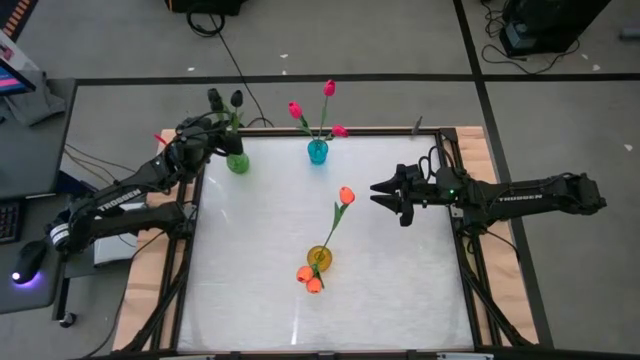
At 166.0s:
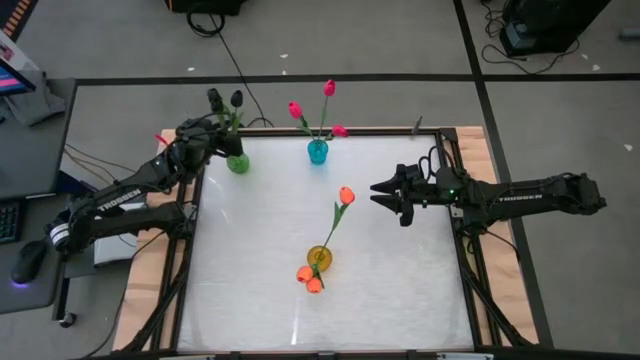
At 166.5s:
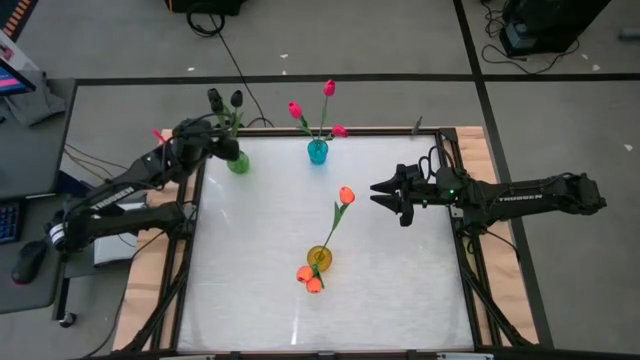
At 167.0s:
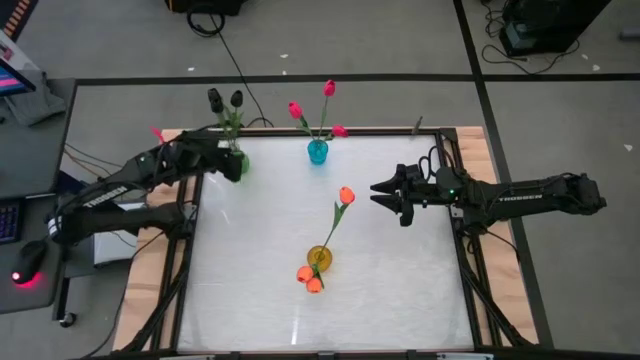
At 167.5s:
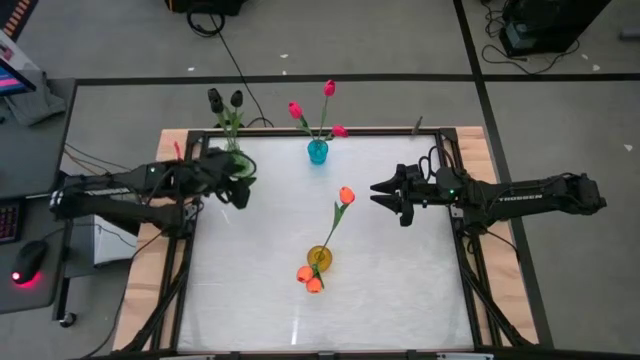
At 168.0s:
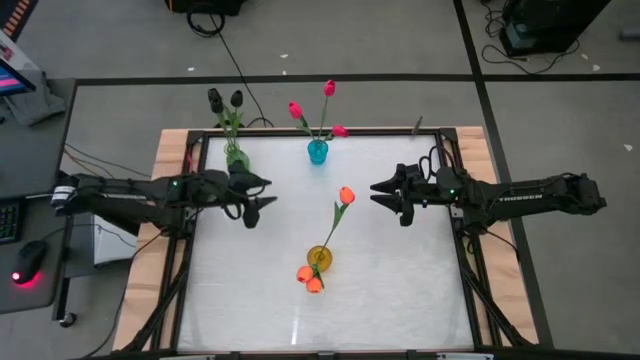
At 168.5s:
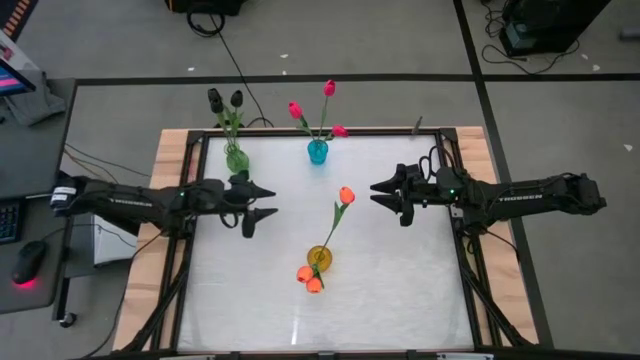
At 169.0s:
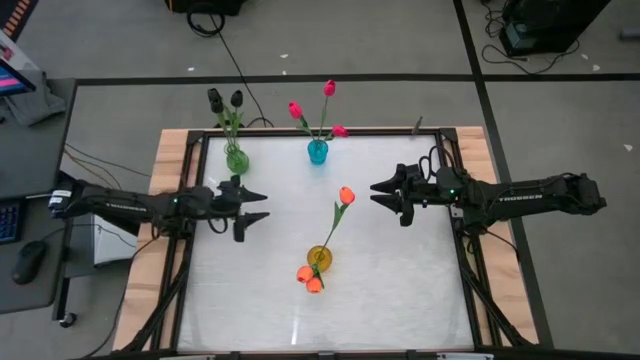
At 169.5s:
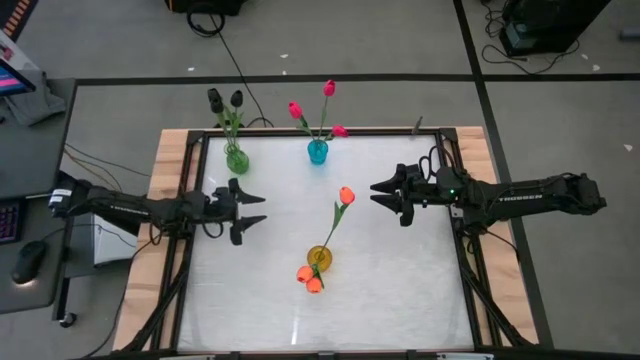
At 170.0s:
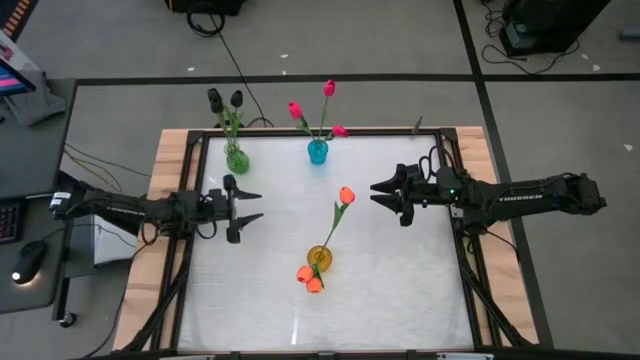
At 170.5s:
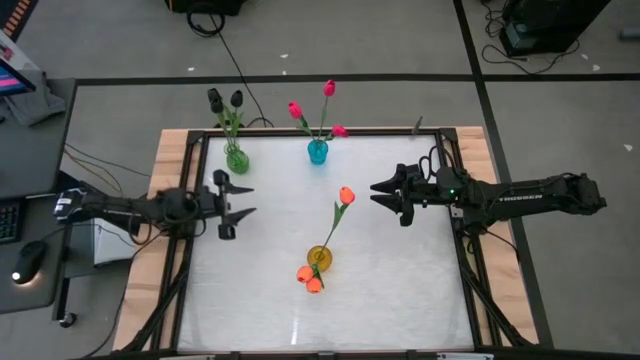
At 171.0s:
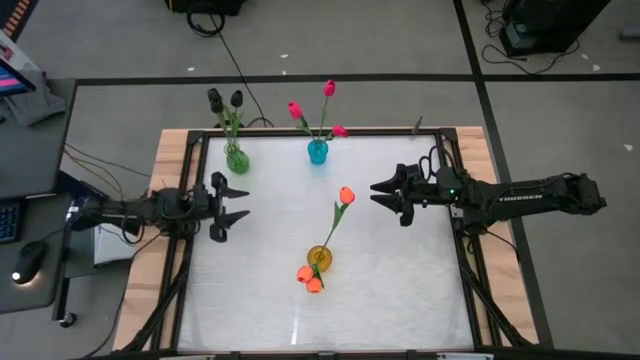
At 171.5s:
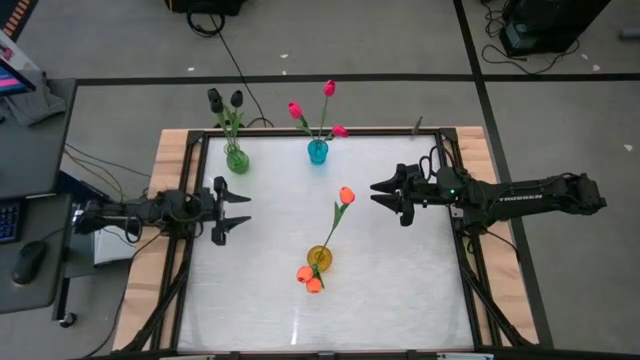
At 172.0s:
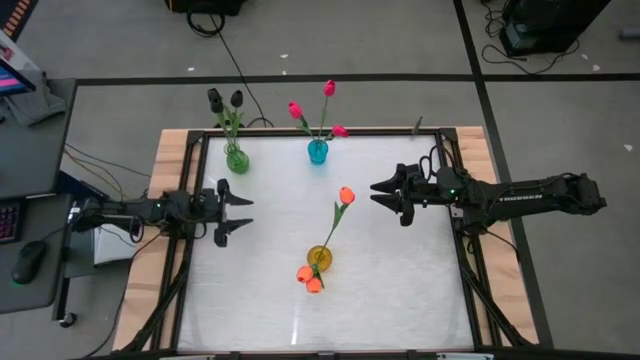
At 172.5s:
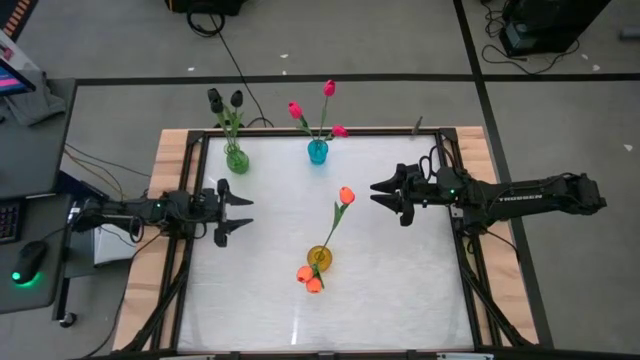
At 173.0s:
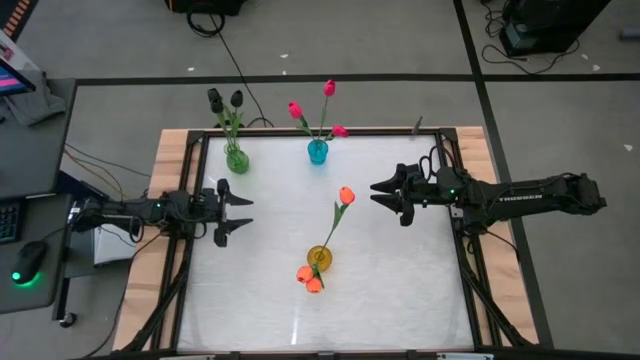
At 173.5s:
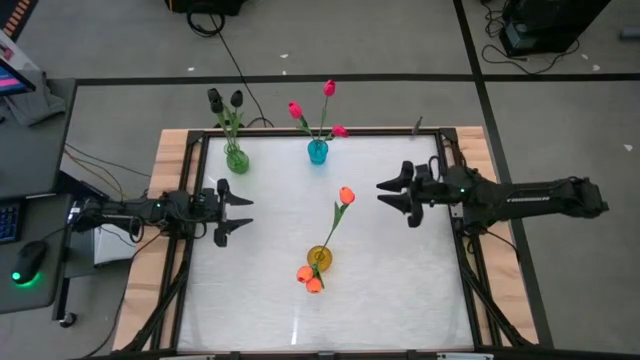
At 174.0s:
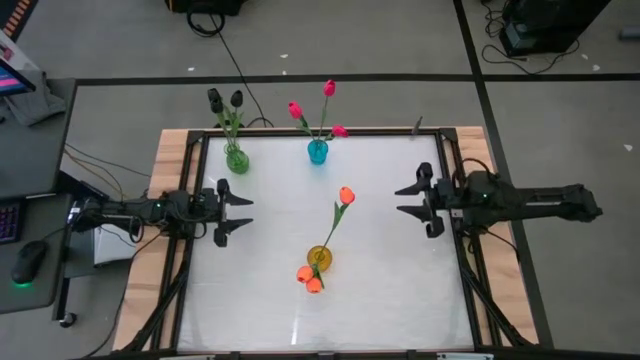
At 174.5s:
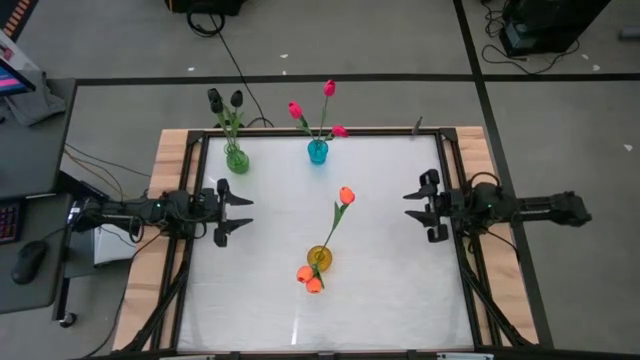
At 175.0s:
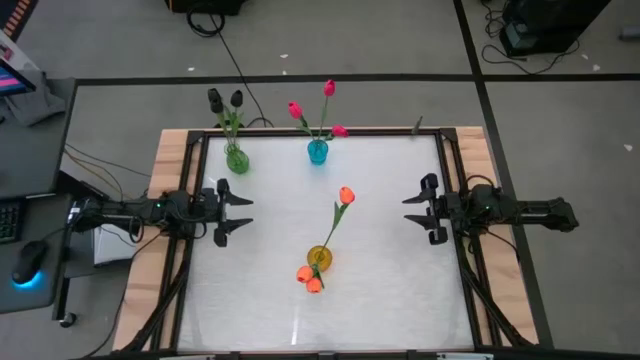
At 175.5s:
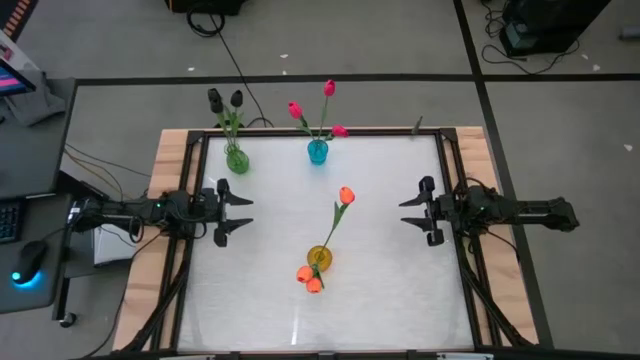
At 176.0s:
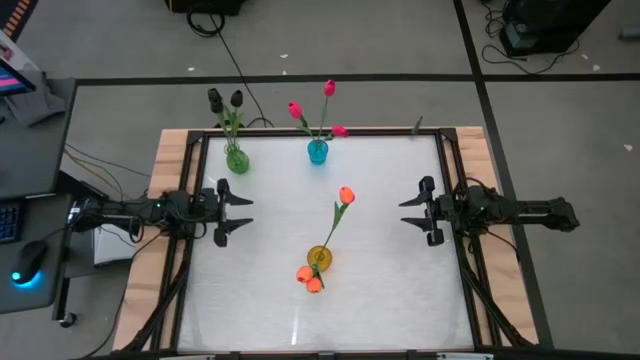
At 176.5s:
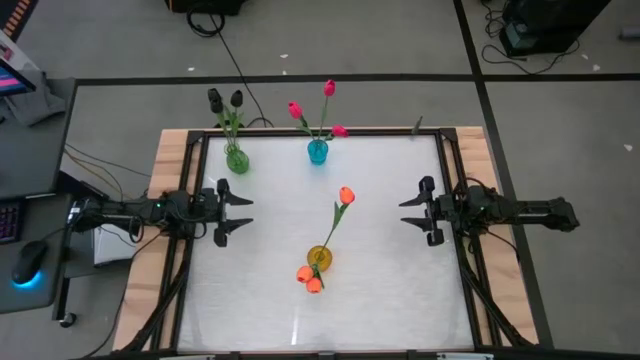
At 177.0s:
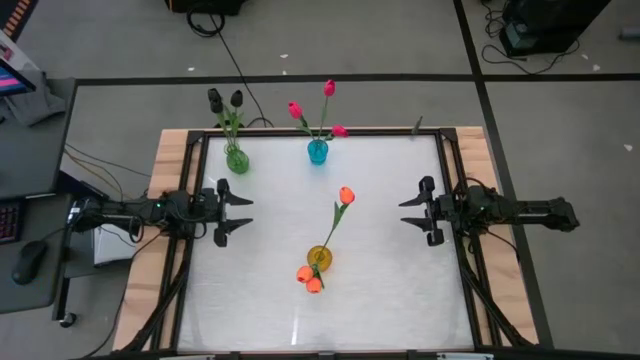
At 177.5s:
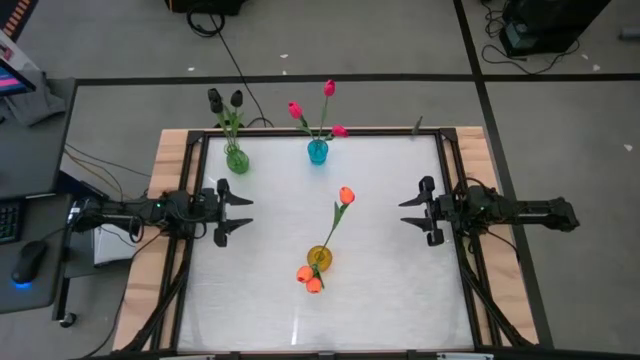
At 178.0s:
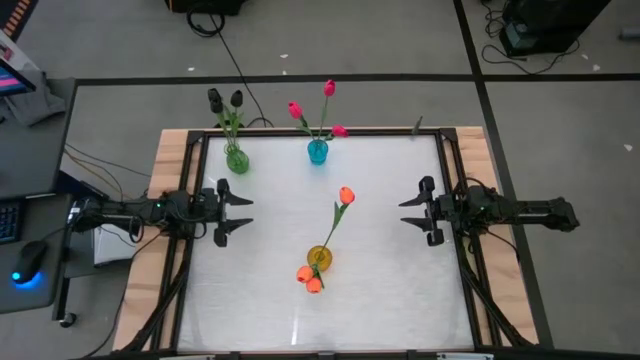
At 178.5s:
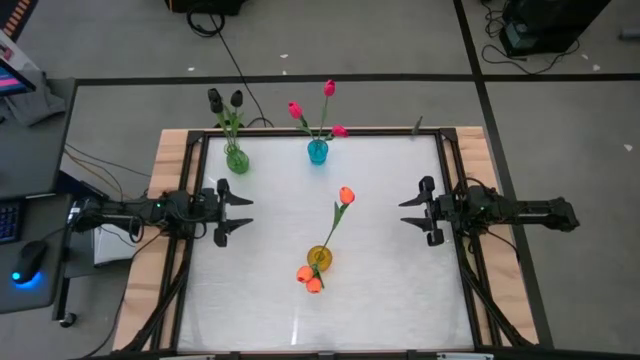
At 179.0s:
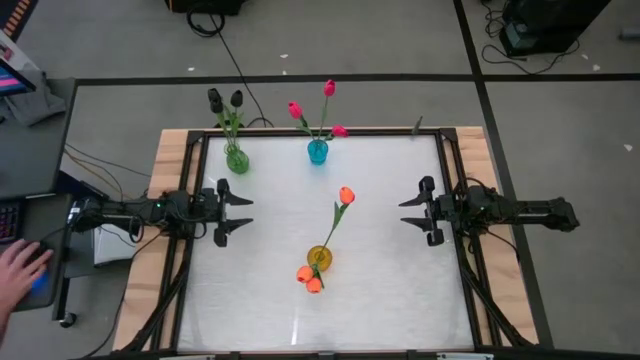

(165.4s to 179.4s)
Task: Sort flowers into vase by color
Return to Home Position

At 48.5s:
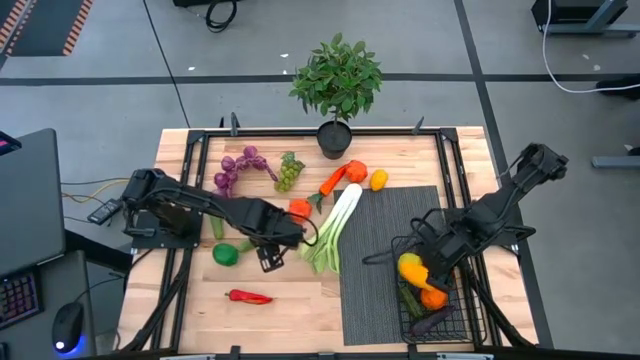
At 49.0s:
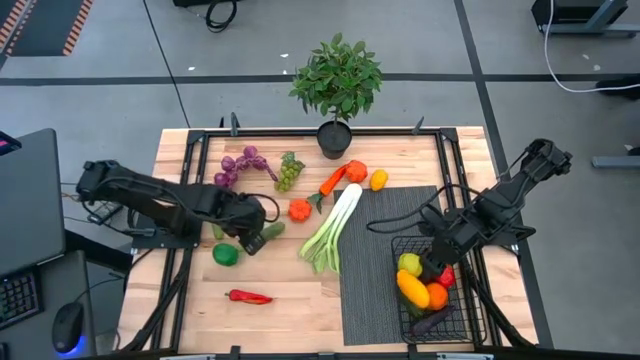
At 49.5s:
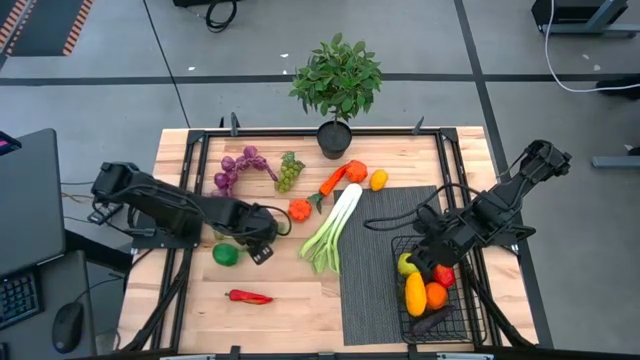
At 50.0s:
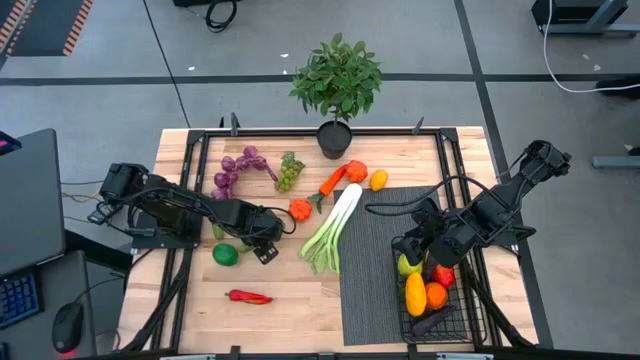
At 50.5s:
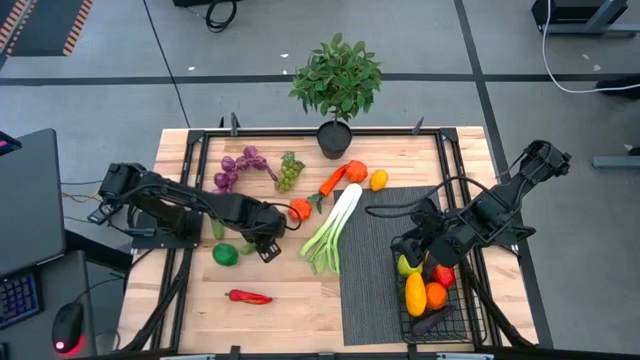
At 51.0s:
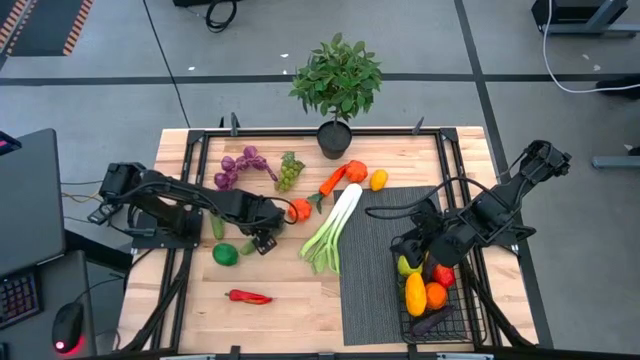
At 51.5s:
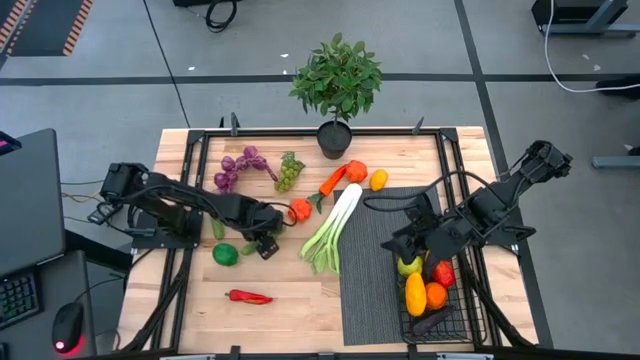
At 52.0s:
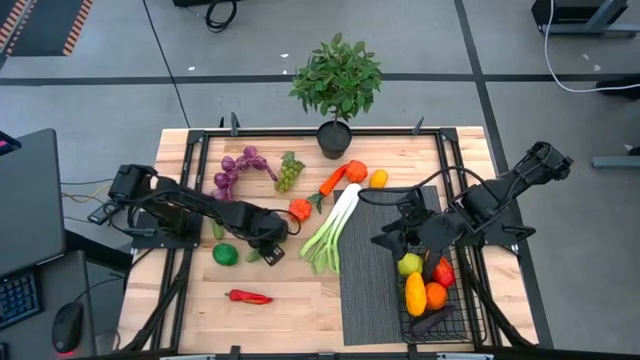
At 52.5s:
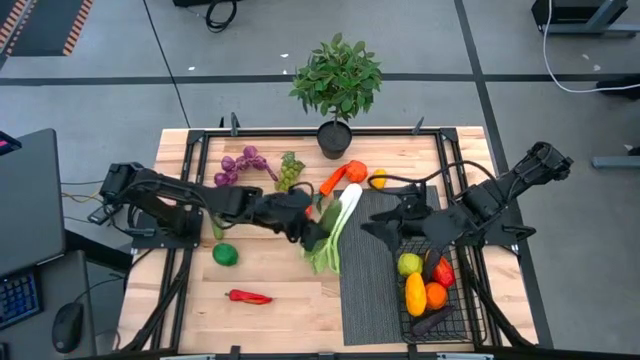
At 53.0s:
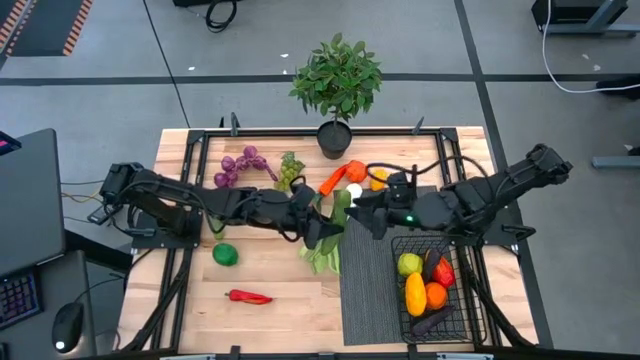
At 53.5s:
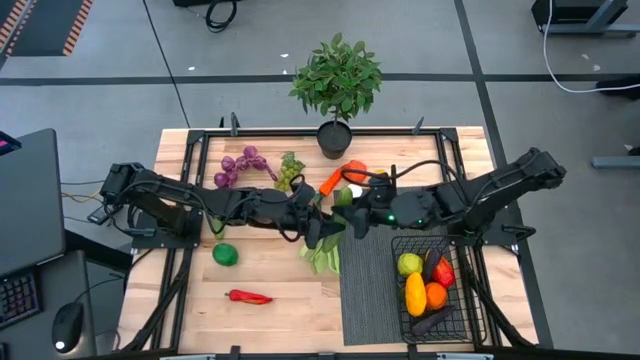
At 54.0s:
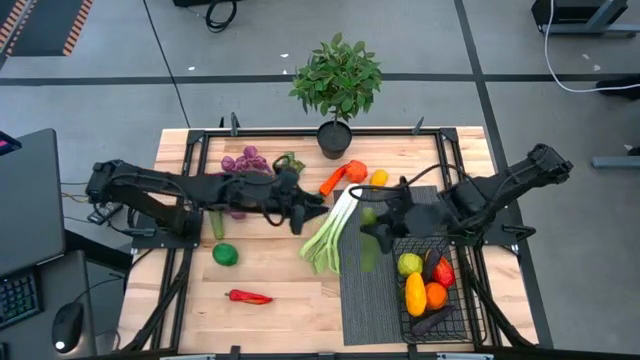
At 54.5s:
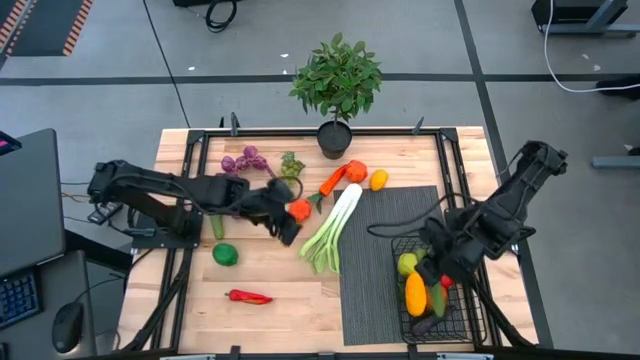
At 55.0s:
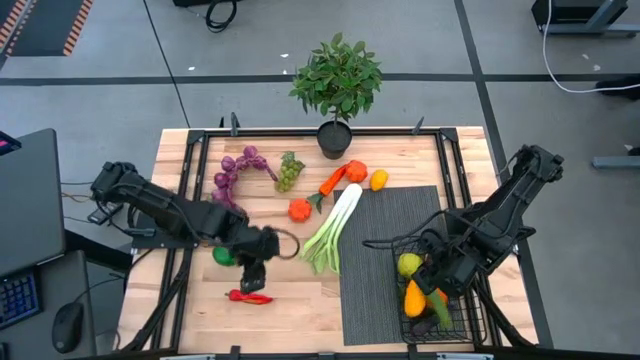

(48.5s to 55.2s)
Task: Build produce basket
Put the right cucumber into the black wire basket
